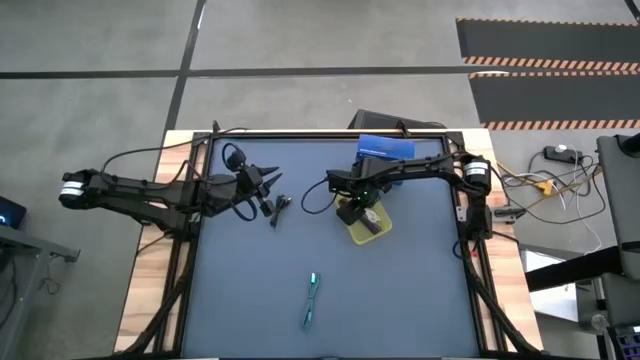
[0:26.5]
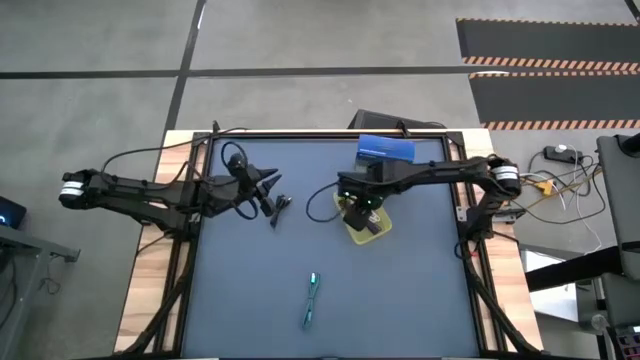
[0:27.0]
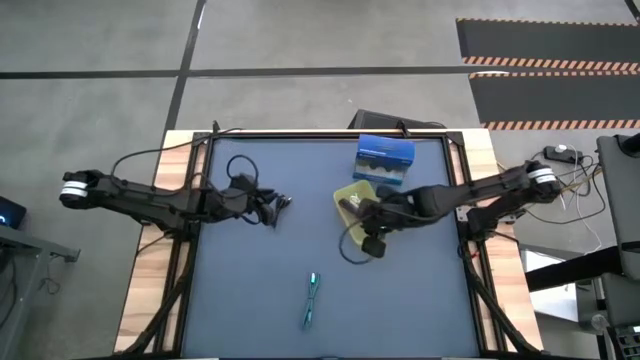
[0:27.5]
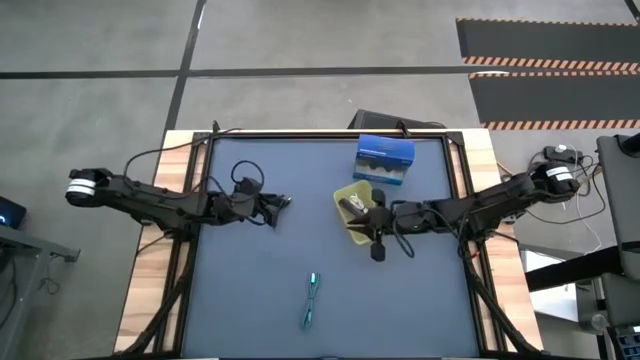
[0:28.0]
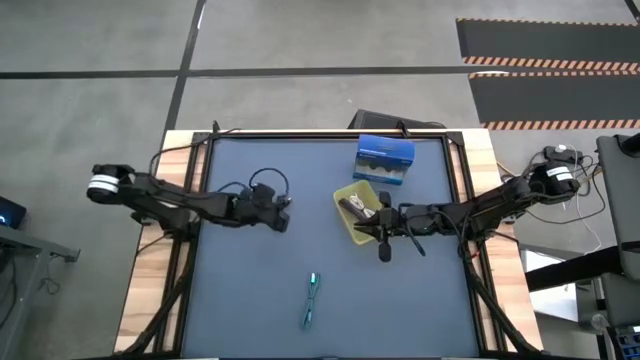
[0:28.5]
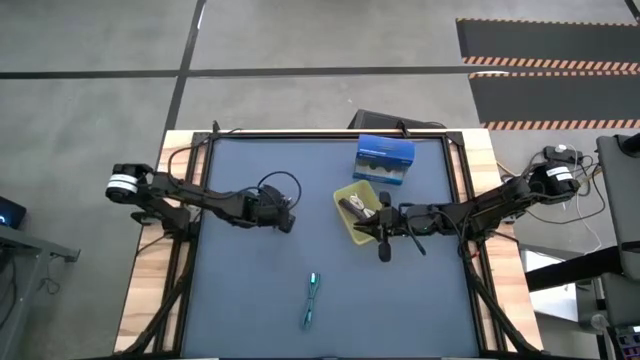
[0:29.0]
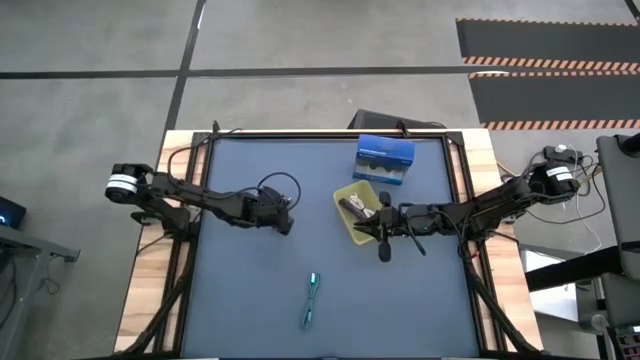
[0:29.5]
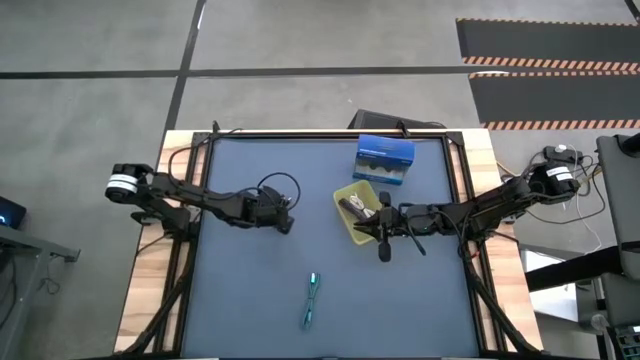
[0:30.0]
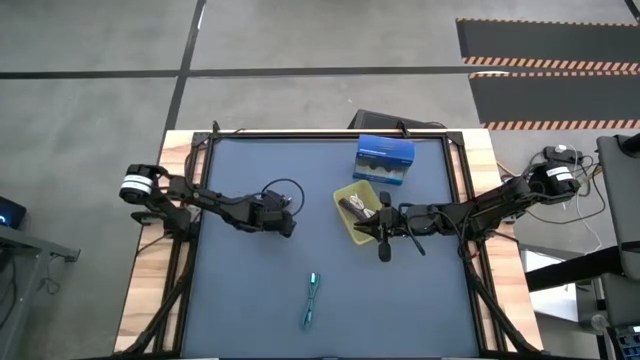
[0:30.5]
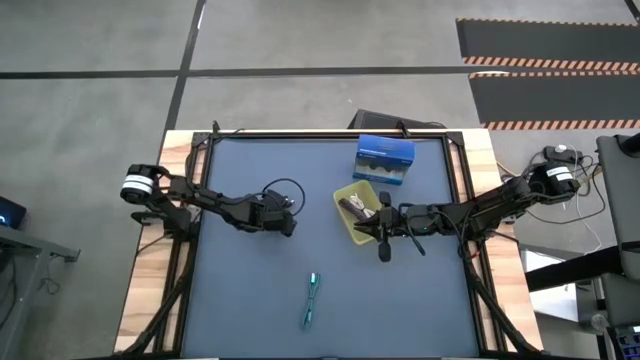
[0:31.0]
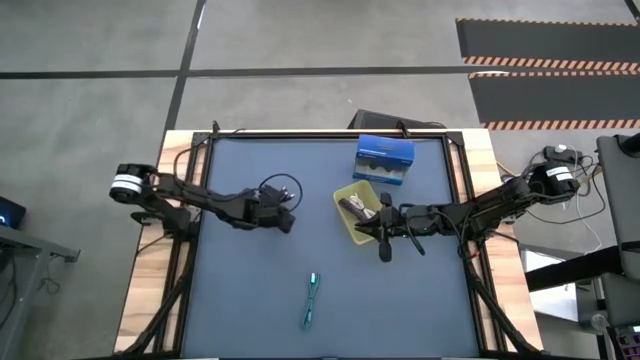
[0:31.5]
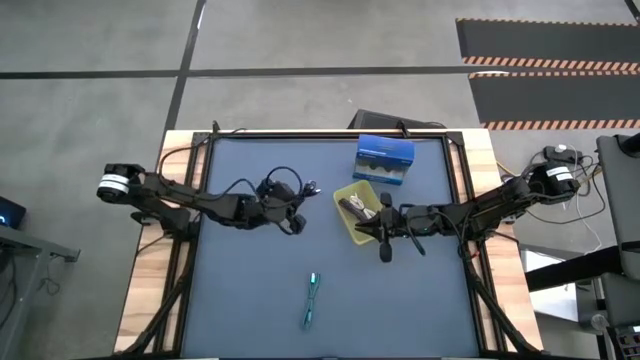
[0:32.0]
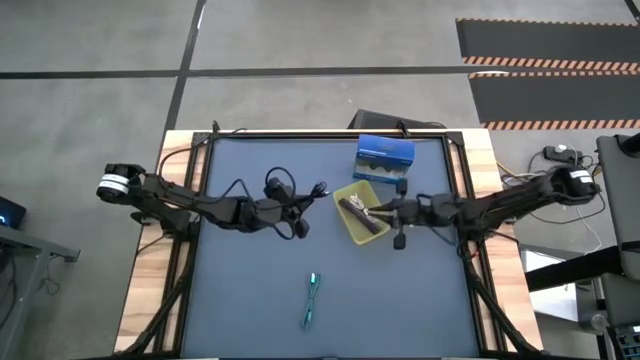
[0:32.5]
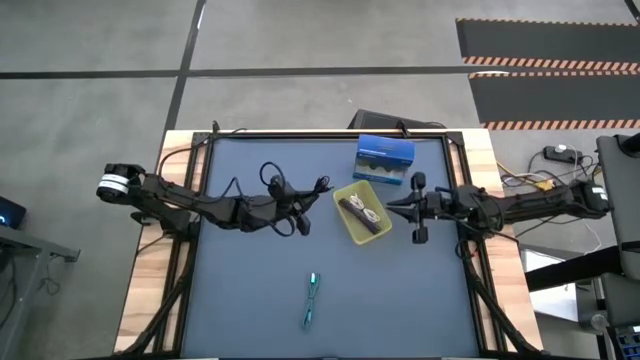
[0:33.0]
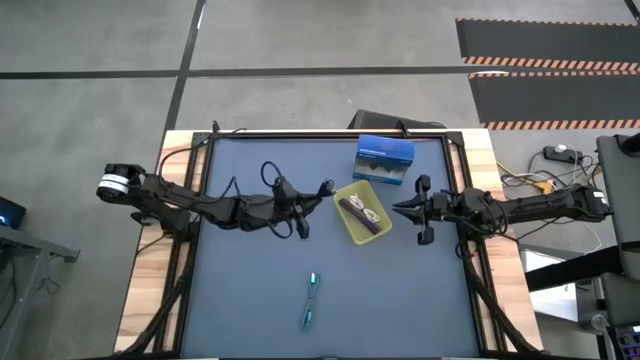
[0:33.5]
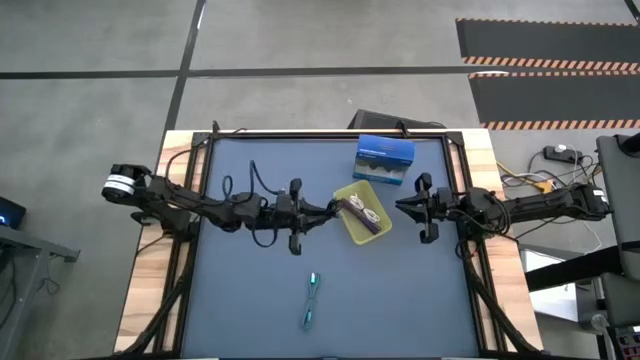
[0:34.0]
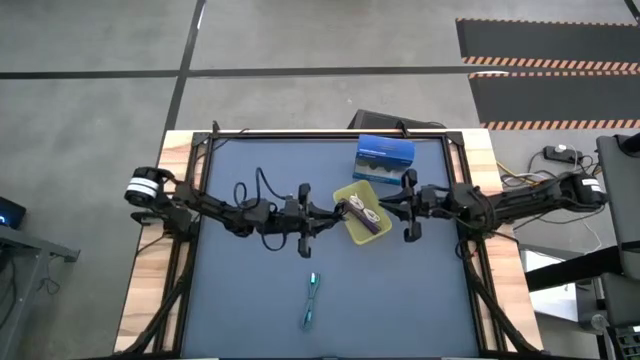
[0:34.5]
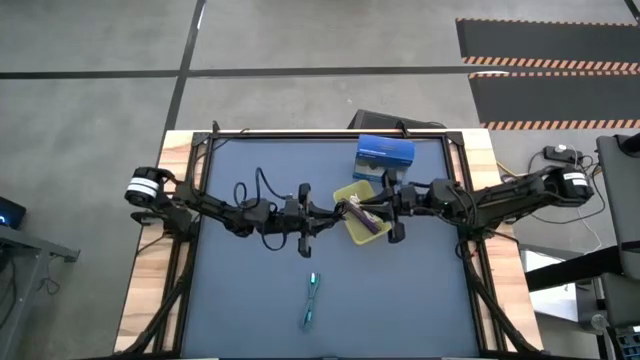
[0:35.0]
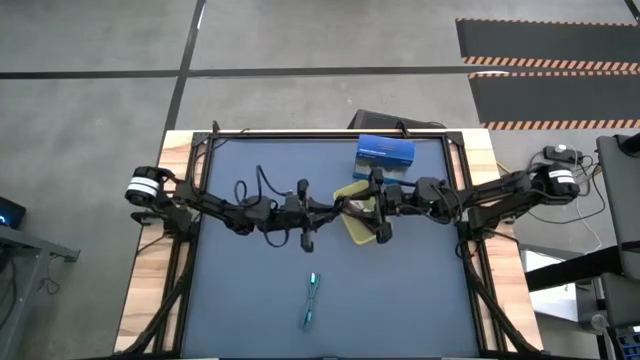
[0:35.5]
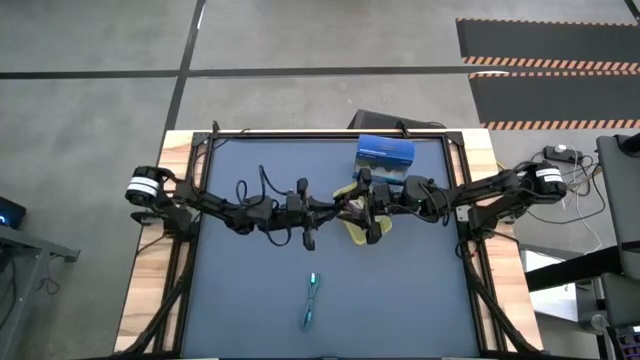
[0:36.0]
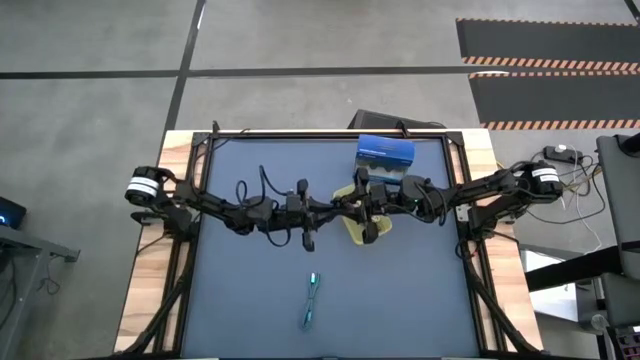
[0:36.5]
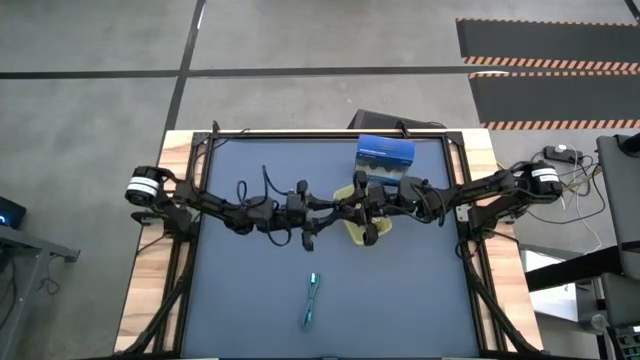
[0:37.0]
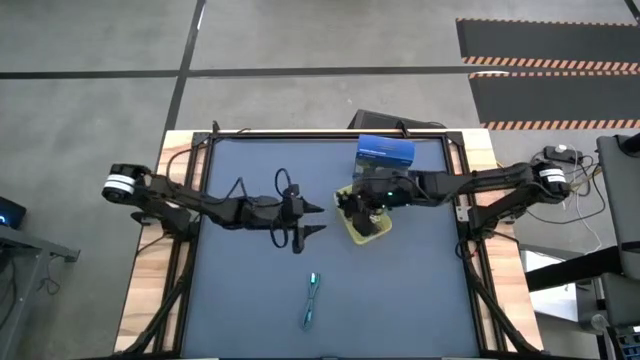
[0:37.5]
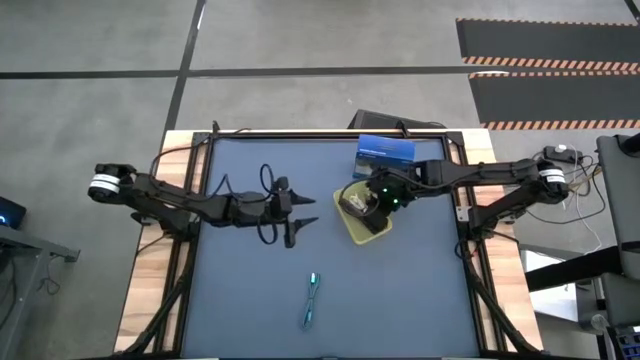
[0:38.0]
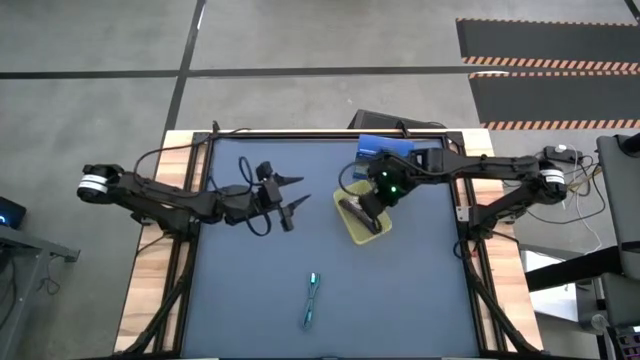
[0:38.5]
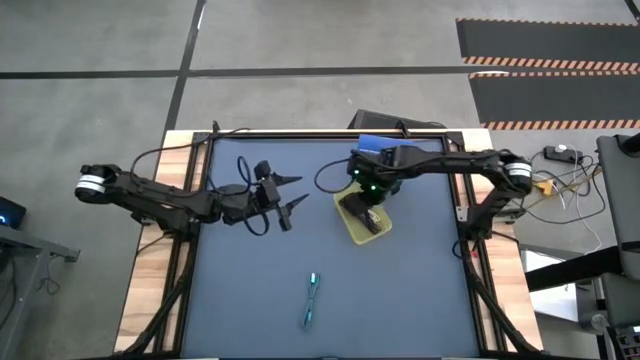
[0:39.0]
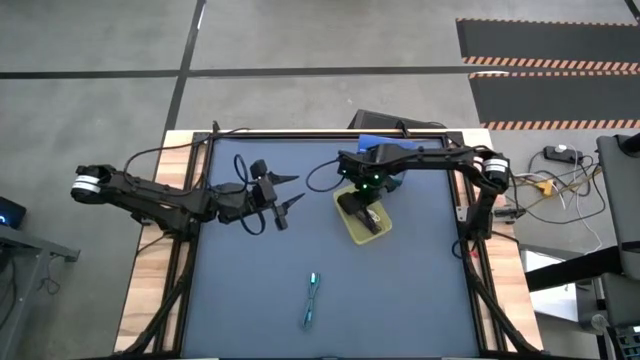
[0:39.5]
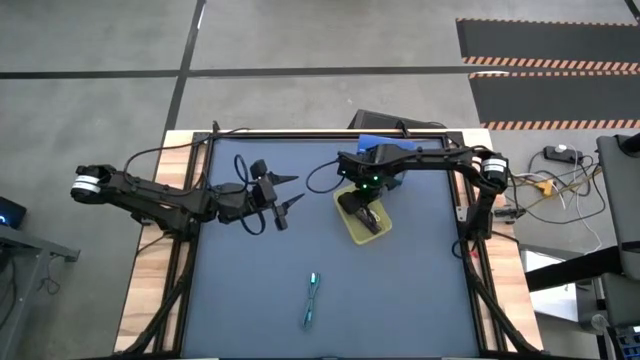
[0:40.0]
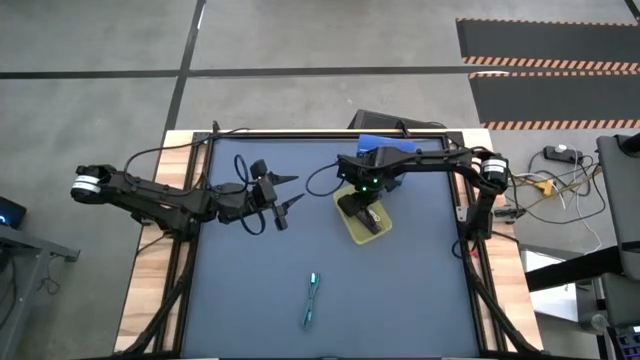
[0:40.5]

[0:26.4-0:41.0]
Task: Pick and place USB-C Cables
Put the black charger cable into the yellow bin

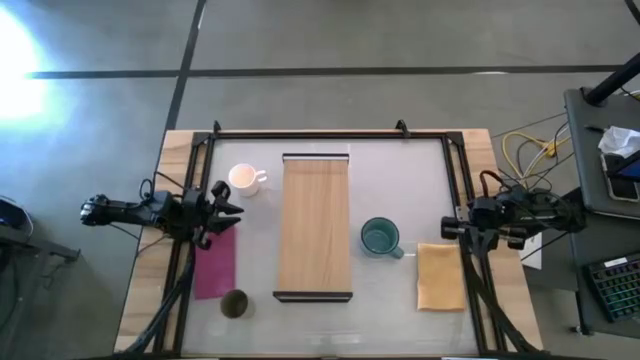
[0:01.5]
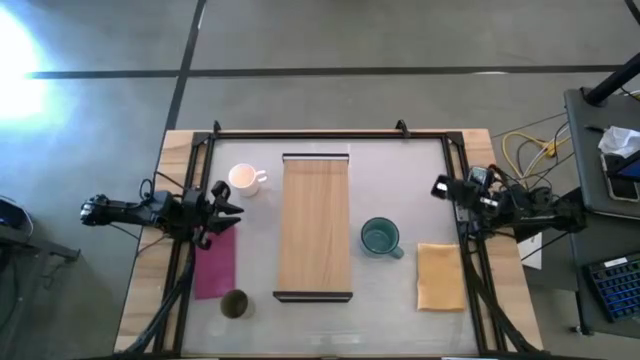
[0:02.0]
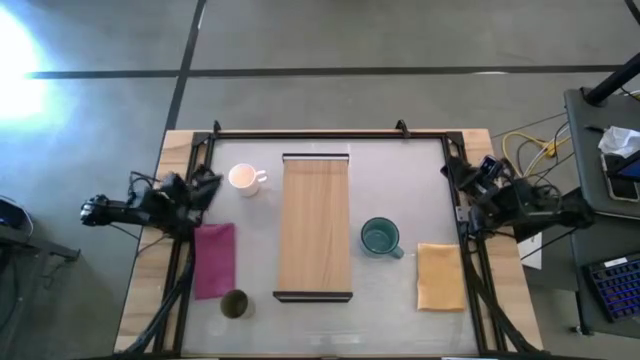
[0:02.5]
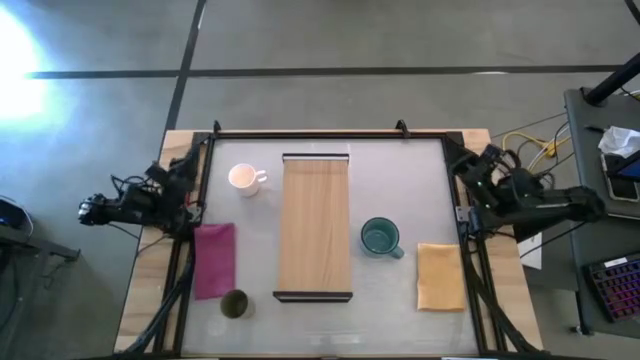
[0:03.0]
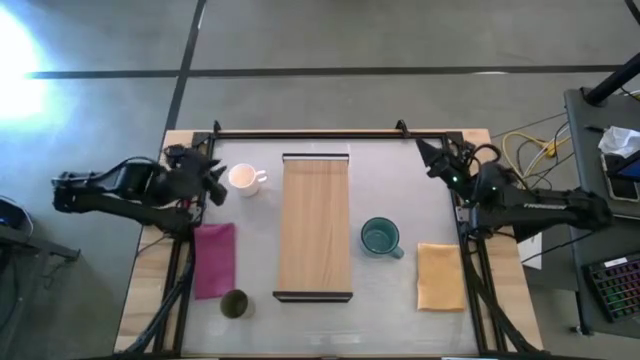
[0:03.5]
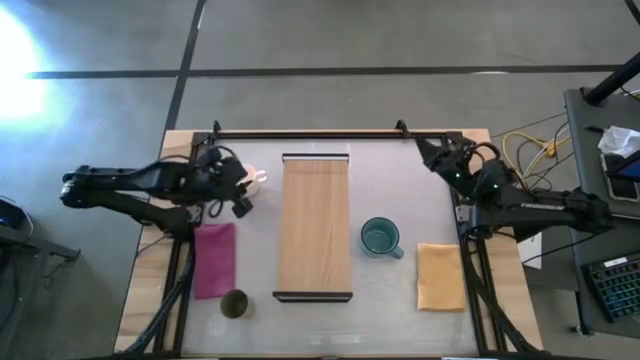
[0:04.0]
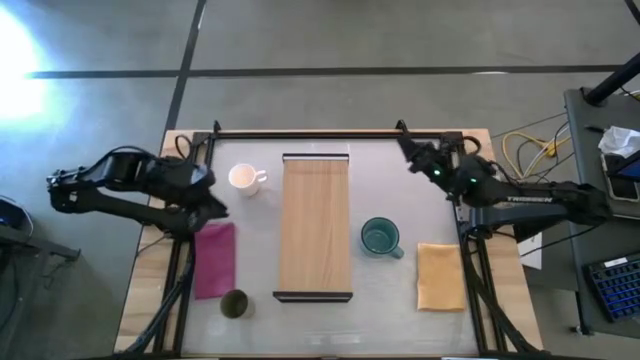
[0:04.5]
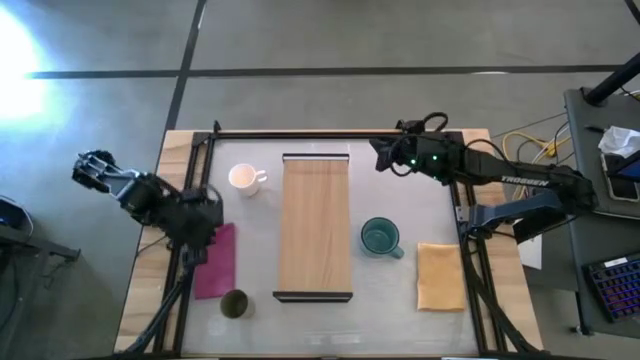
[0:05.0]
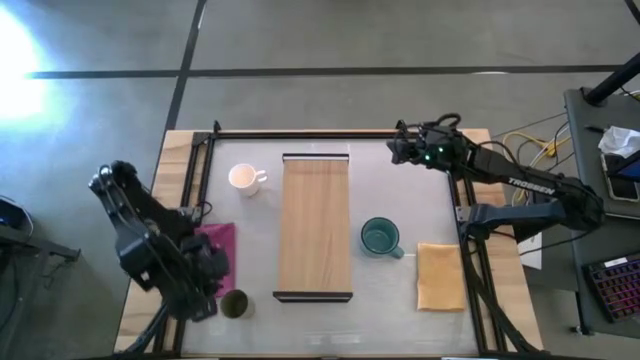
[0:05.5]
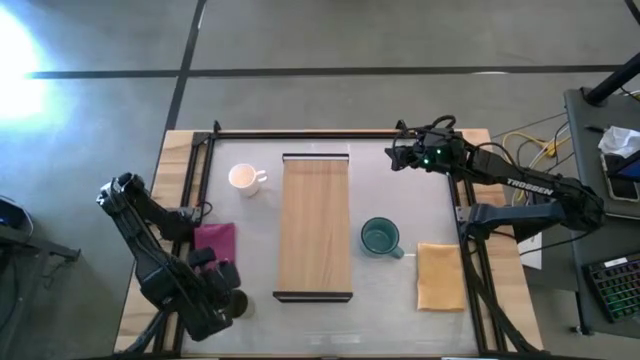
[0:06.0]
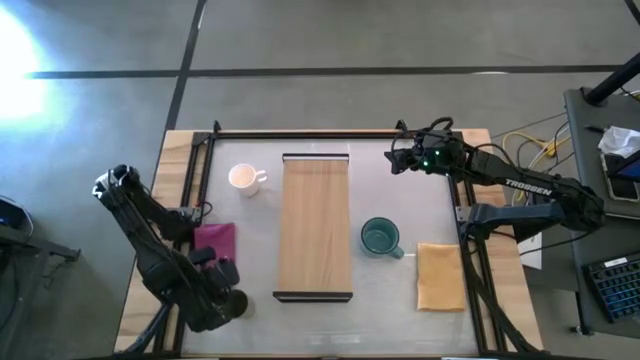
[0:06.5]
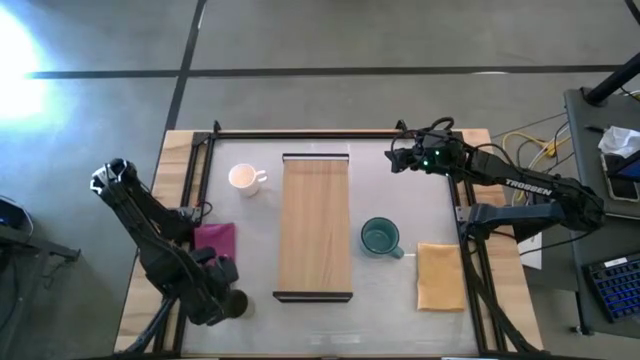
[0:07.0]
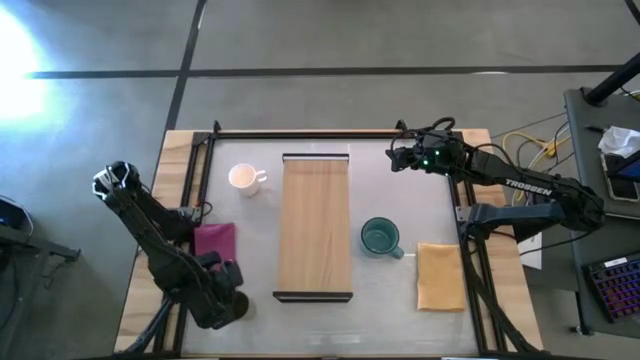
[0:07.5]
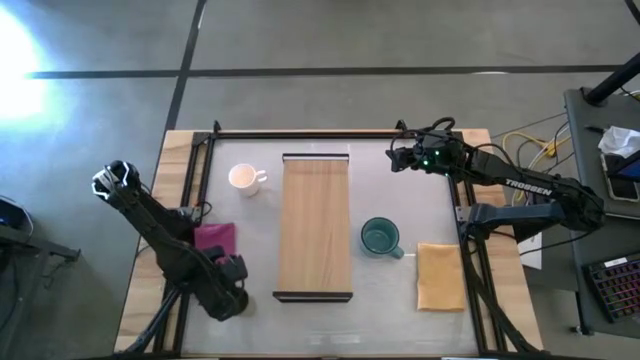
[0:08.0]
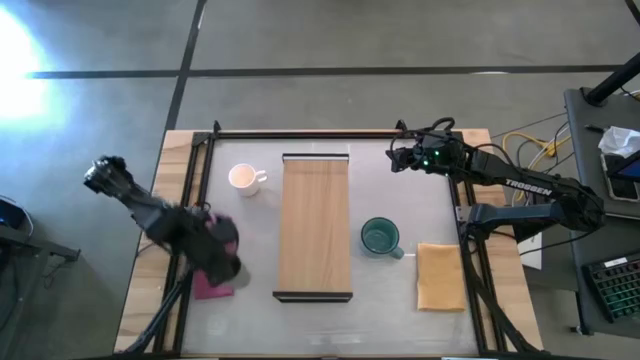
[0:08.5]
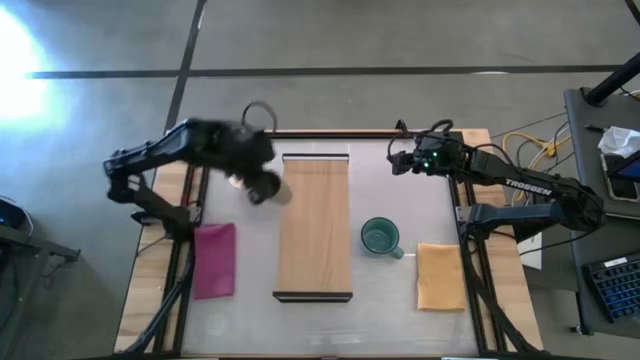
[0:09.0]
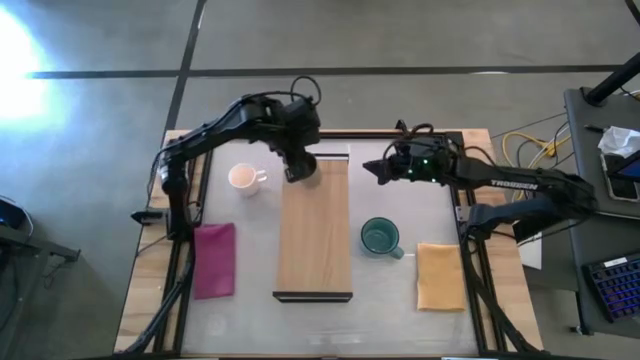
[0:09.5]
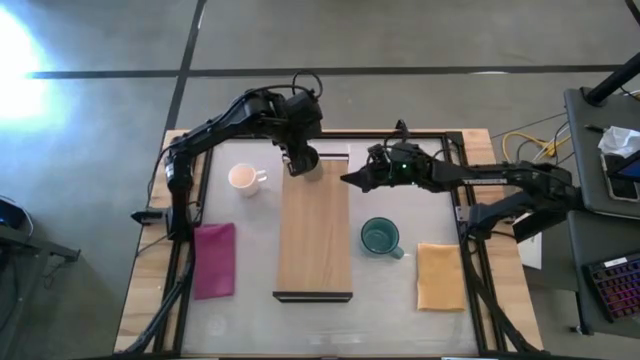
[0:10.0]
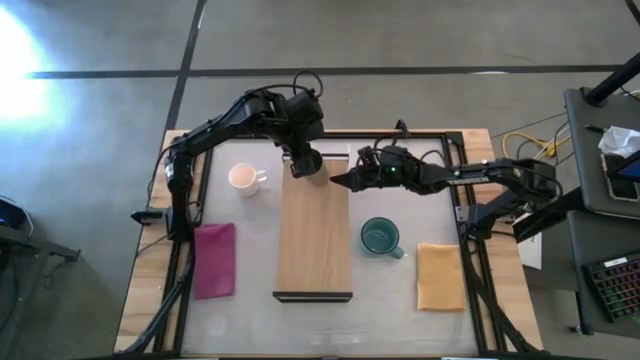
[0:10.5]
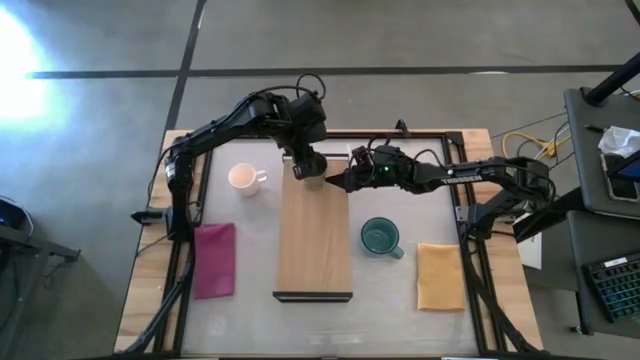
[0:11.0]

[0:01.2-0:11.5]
Task: Stack small to large cups/mugs on shelf
Put the gray cup on the shelf
